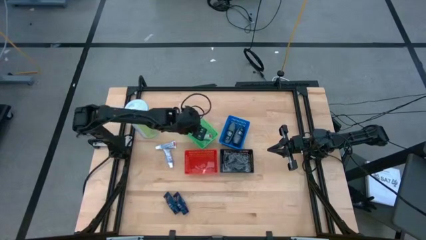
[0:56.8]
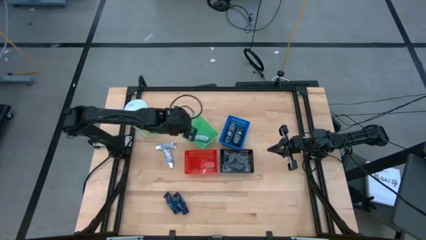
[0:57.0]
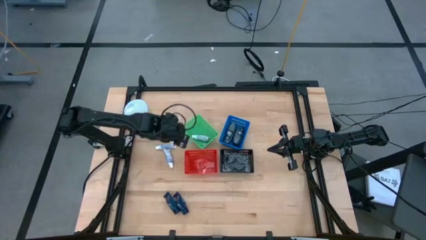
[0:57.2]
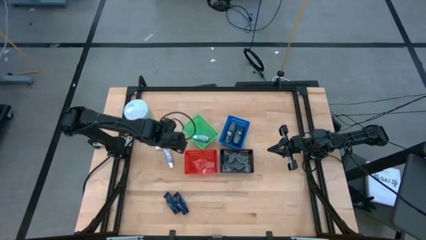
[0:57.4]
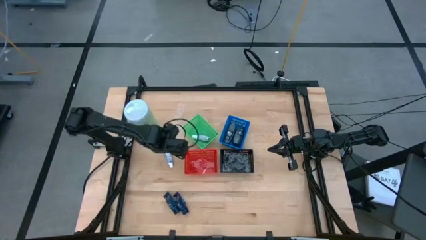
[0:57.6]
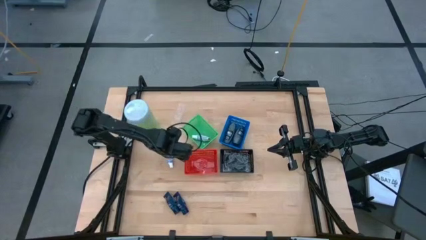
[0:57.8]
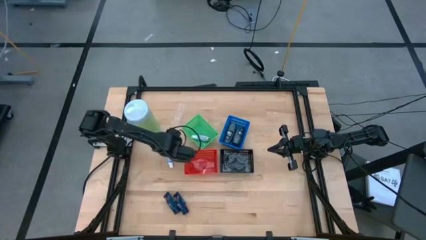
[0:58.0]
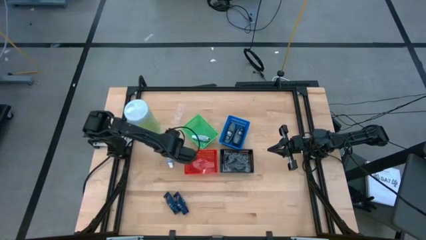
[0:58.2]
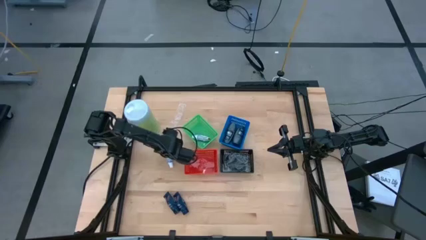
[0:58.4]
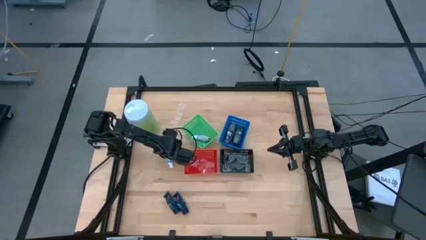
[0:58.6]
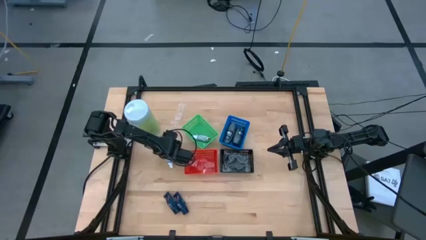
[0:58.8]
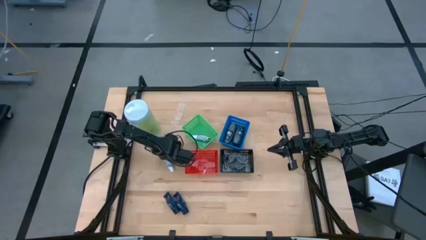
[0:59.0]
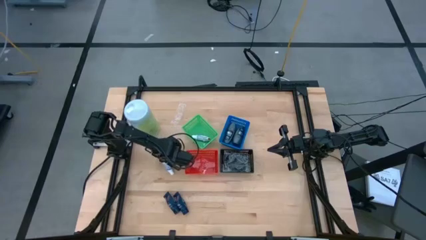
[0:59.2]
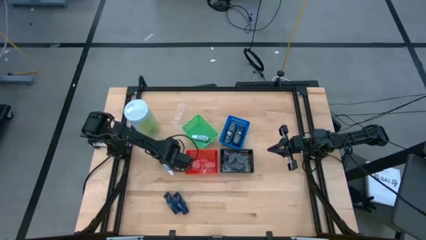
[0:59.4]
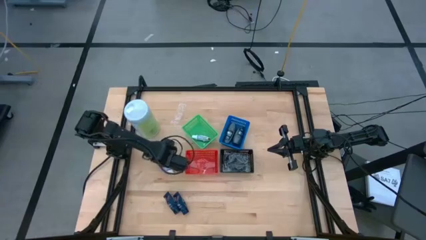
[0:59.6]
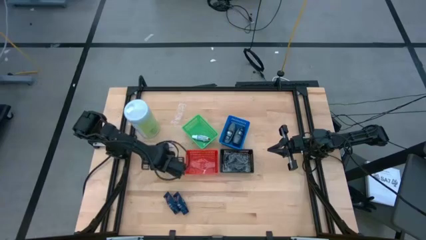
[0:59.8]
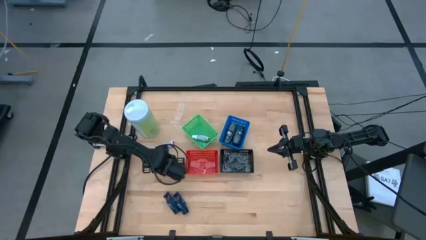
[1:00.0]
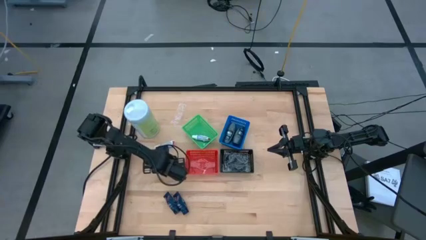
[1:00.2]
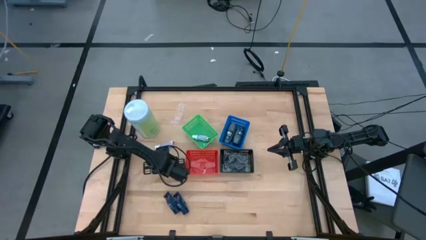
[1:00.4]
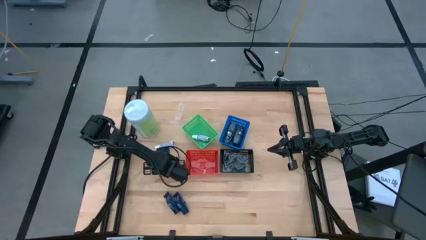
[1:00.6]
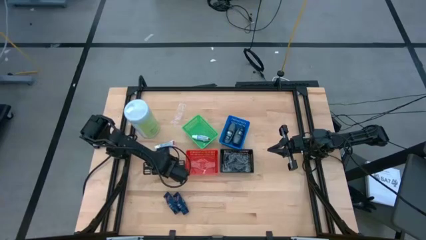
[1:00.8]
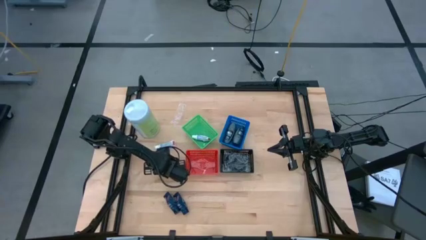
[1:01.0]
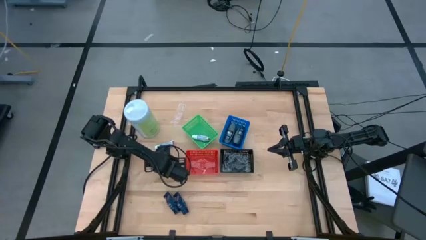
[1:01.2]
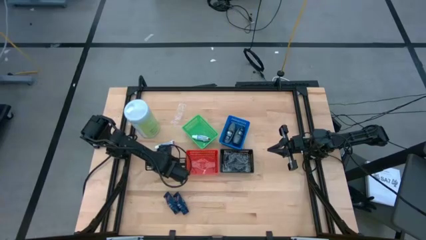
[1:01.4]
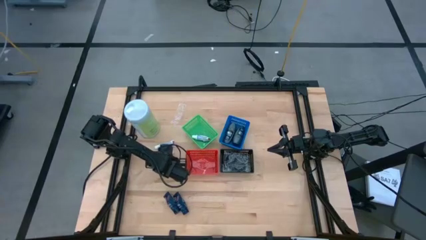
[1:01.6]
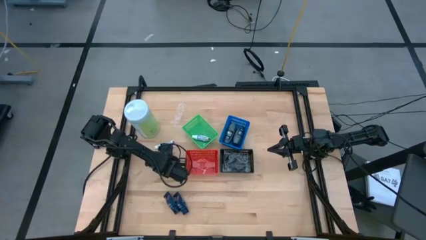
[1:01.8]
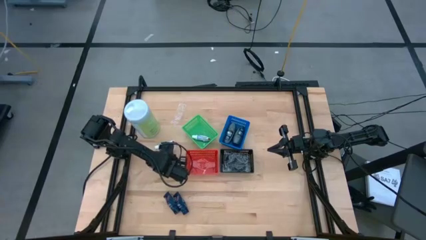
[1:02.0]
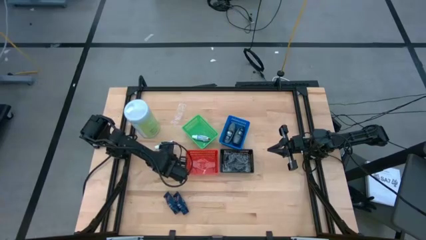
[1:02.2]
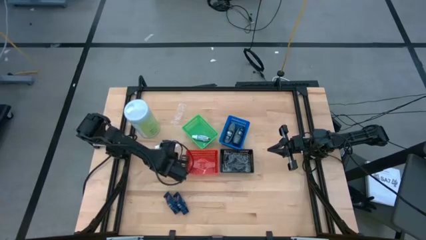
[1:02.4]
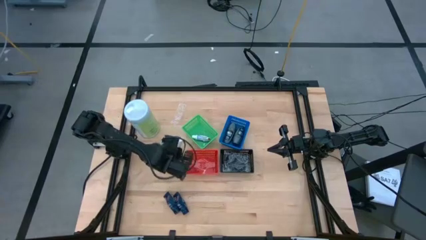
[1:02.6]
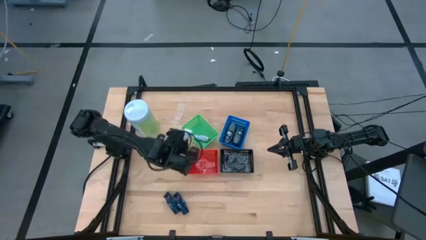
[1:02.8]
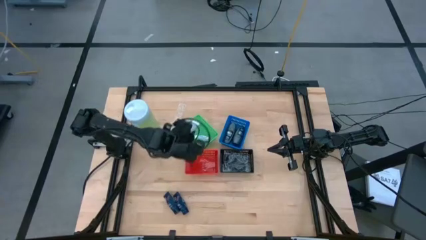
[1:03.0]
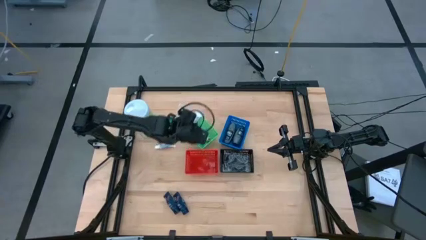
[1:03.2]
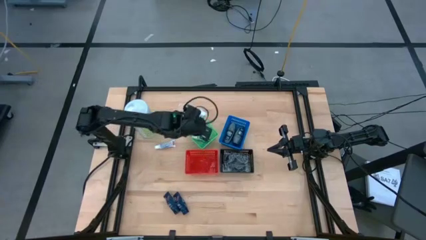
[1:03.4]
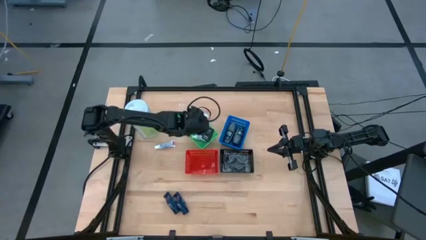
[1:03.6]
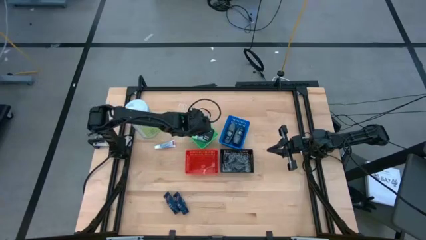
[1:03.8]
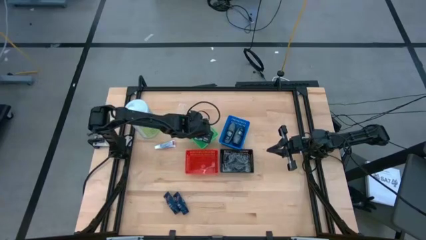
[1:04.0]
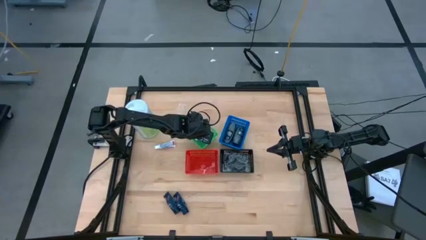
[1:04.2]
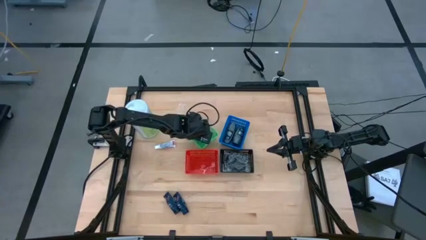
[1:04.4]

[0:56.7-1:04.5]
Task: Pick & Place Travel size toiletries
Put the bottom toothpaste into the green bin

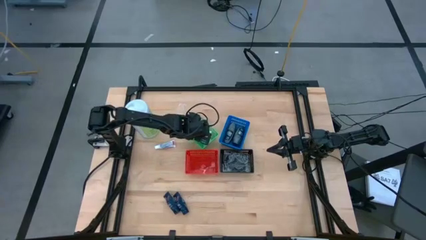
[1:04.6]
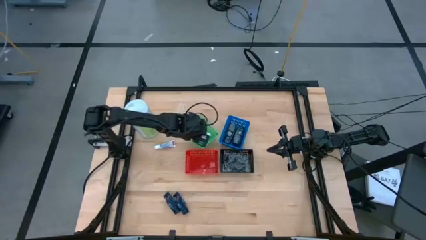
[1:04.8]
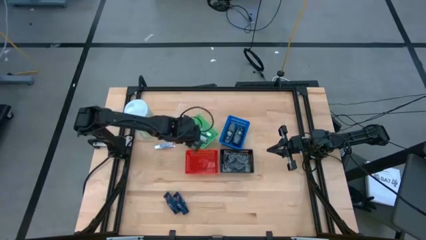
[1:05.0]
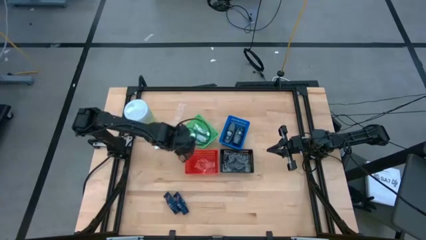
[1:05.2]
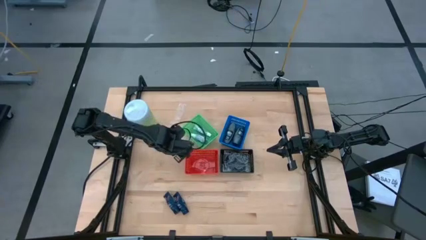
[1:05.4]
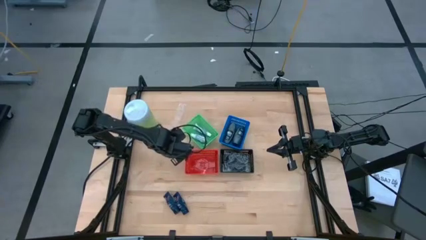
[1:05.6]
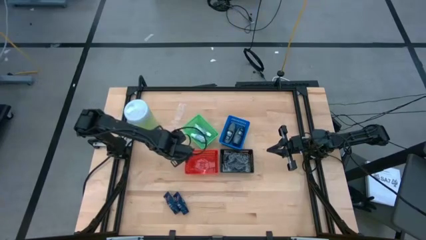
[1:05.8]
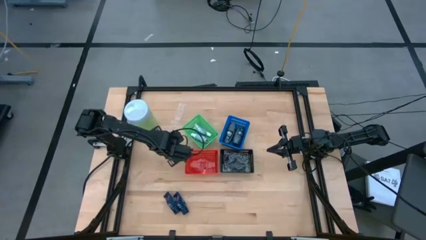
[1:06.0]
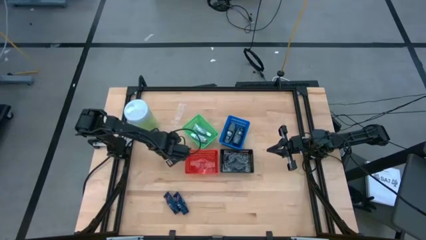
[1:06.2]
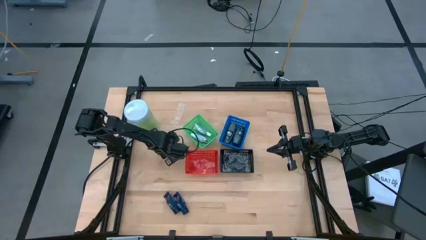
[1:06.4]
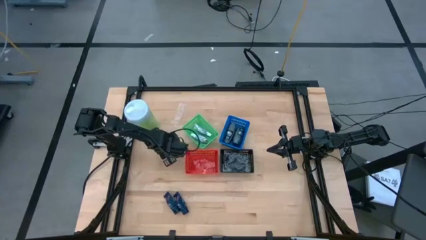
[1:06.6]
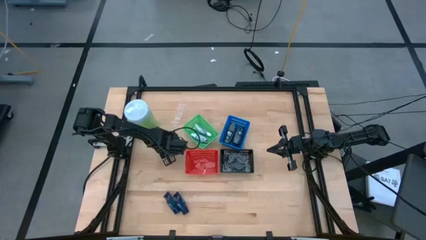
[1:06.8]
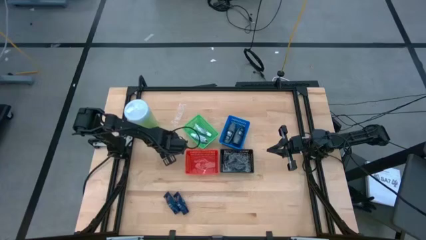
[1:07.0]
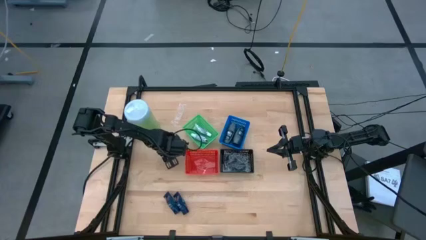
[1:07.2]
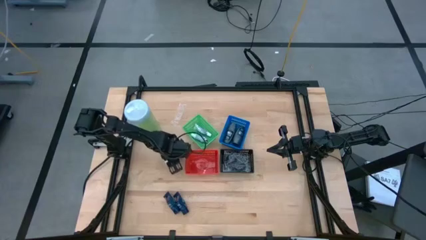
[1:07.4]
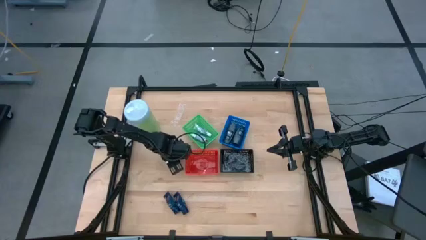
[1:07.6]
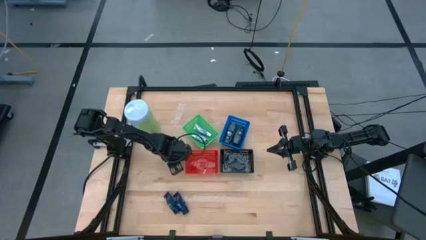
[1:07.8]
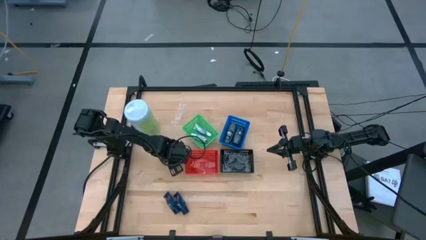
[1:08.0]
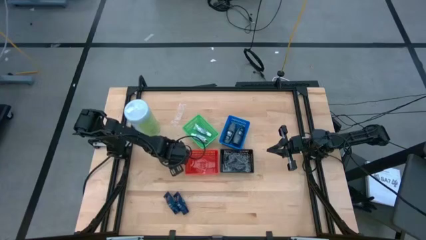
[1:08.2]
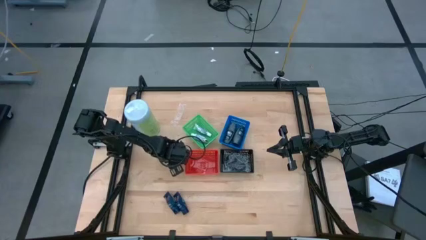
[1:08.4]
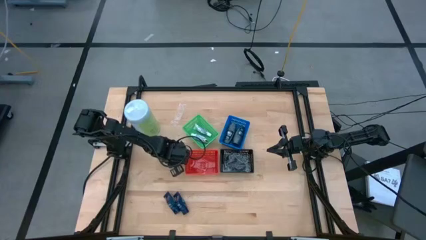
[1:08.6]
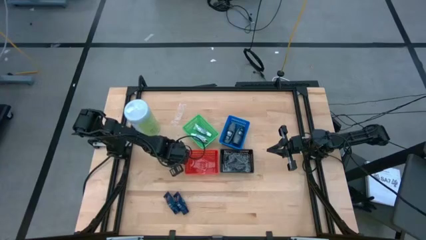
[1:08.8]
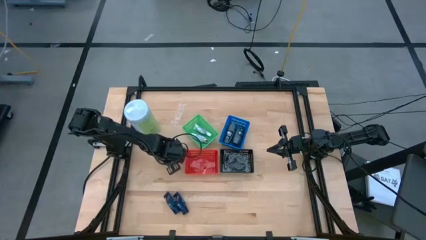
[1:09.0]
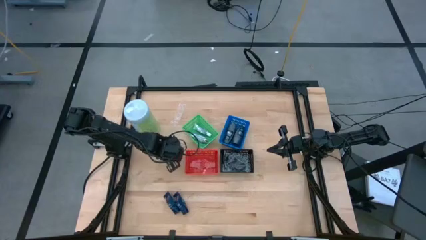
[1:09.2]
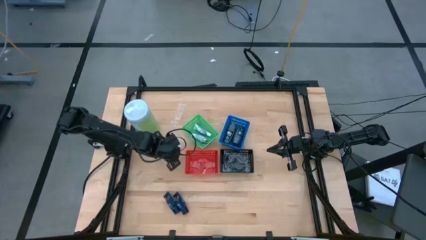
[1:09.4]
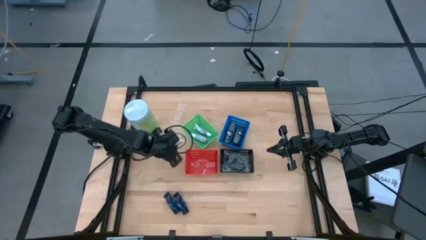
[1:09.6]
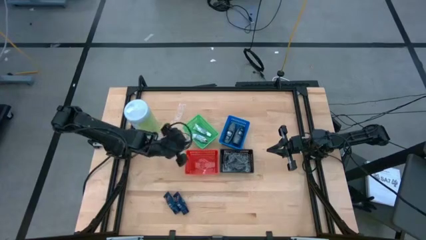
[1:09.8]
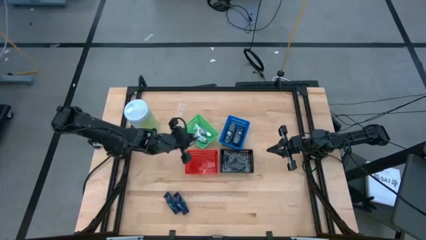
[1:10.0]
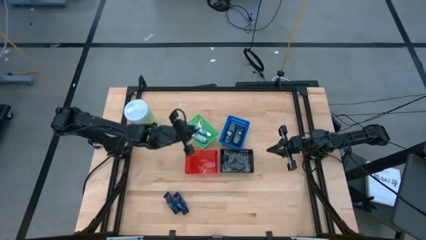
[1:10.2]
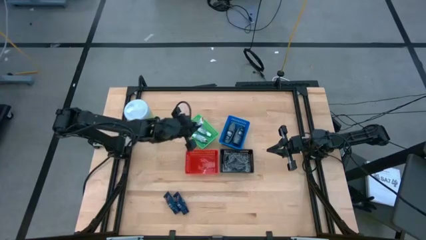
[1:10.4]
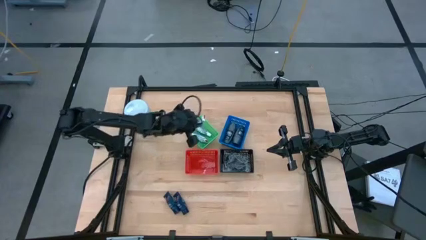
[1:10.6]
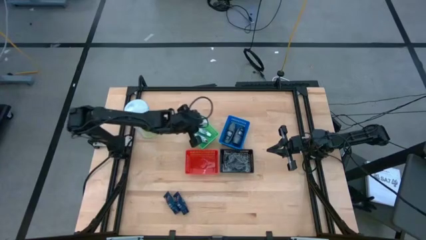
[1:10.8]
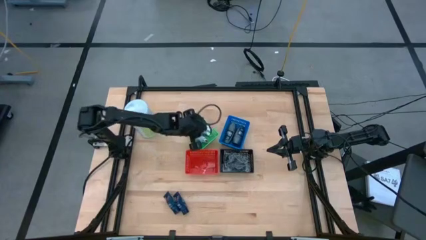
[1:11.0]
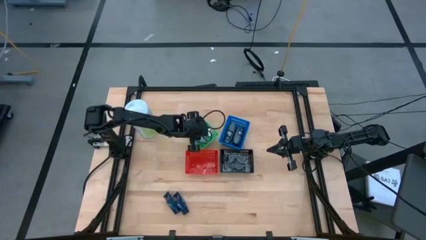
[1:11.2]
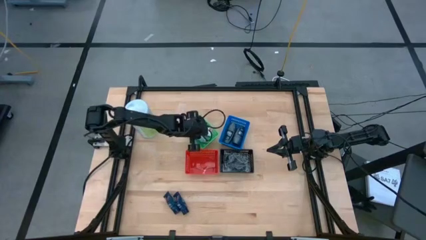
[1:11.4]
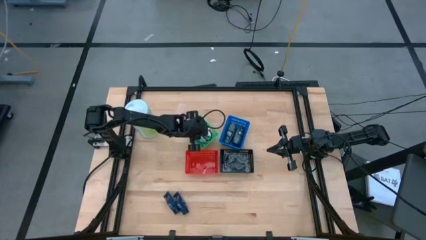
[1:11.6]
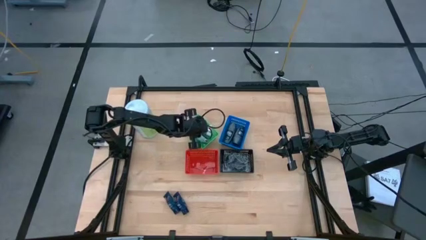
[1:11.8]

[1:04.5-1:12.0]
Put the toothpaste into the green bin
